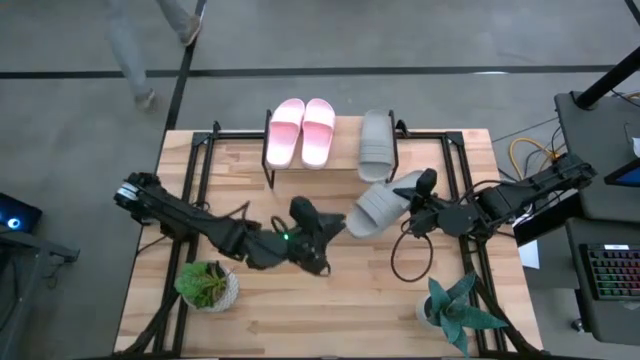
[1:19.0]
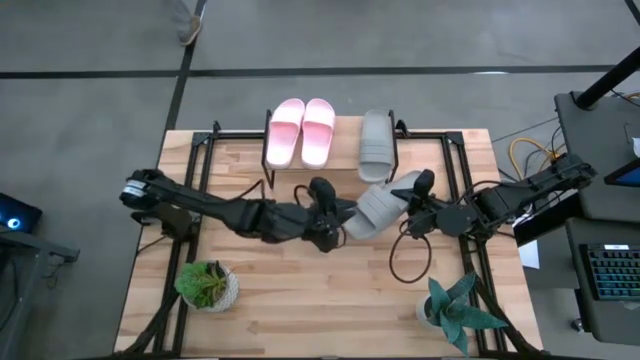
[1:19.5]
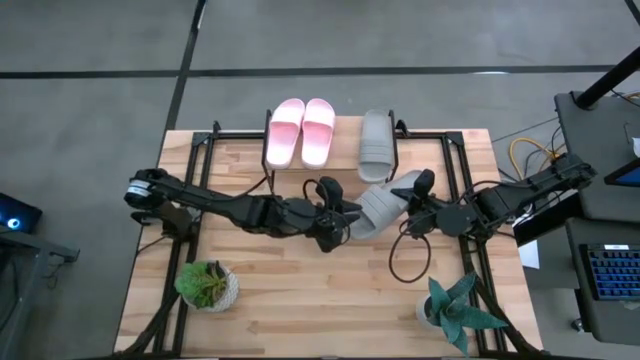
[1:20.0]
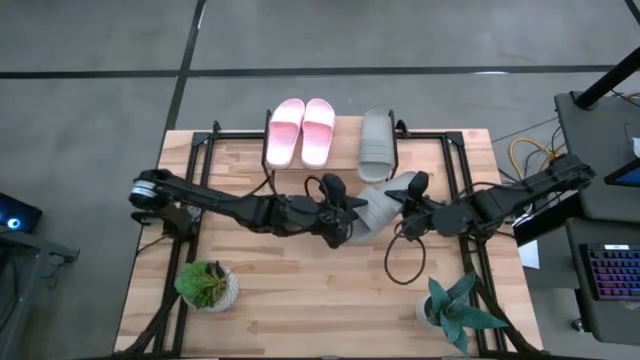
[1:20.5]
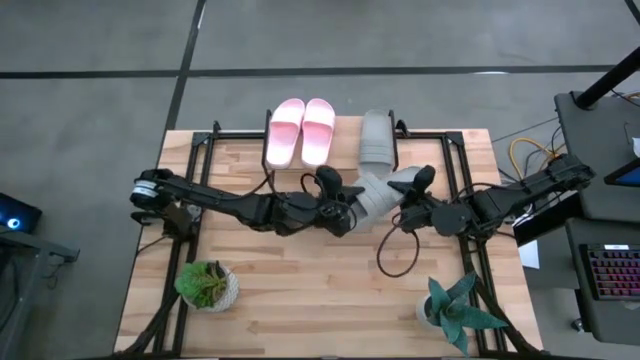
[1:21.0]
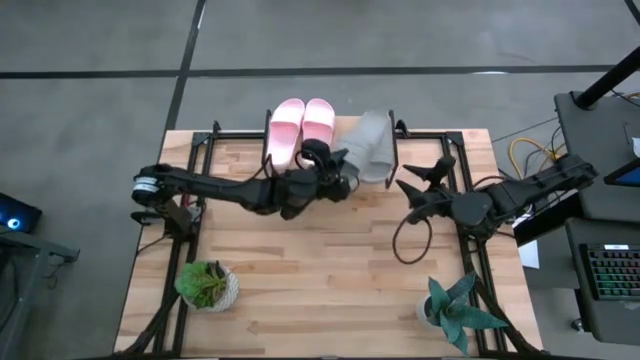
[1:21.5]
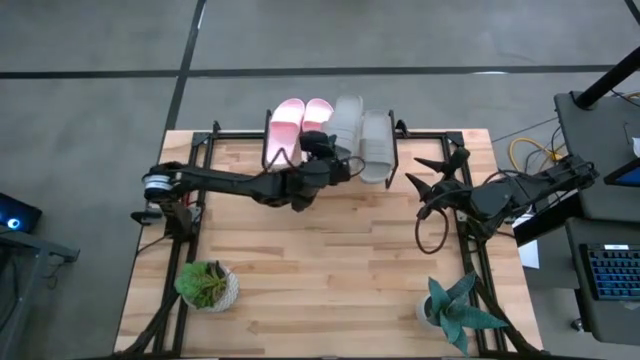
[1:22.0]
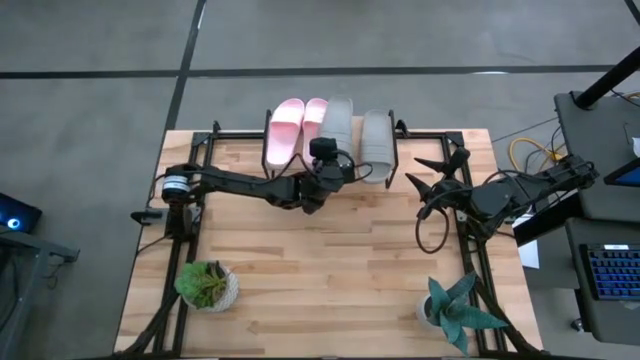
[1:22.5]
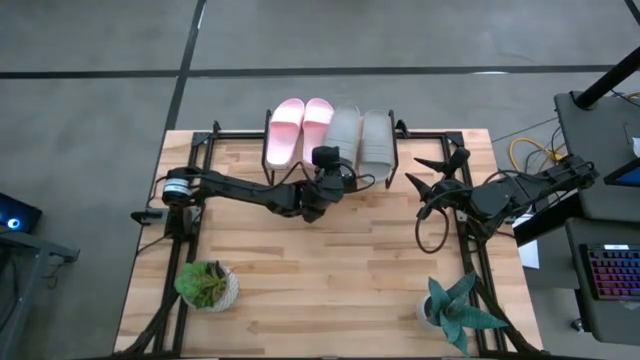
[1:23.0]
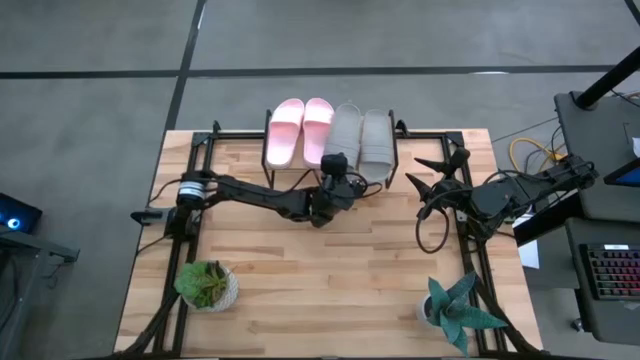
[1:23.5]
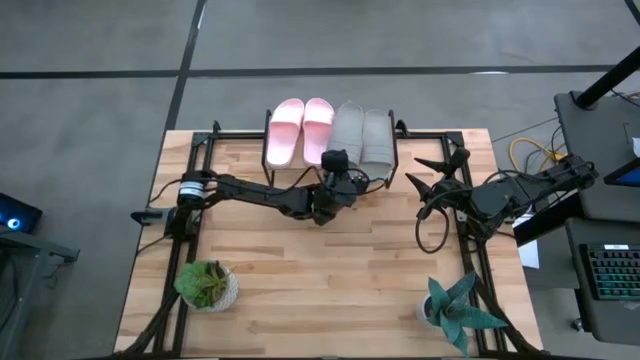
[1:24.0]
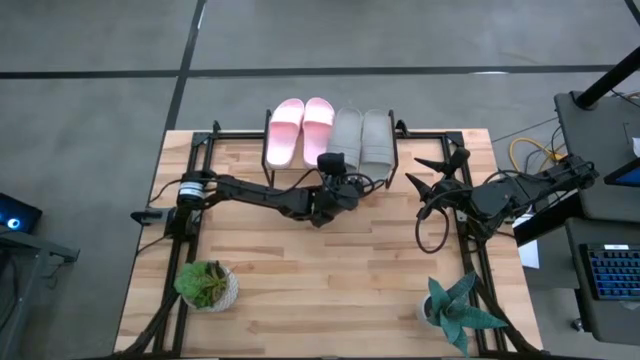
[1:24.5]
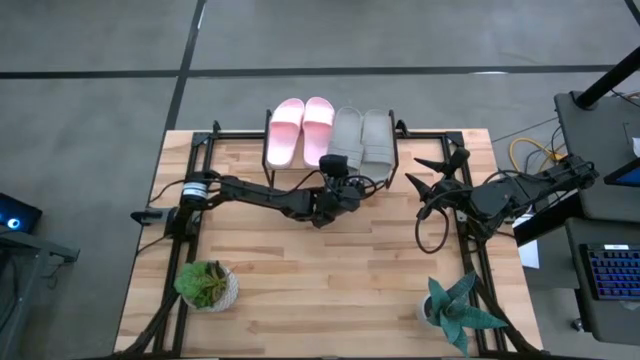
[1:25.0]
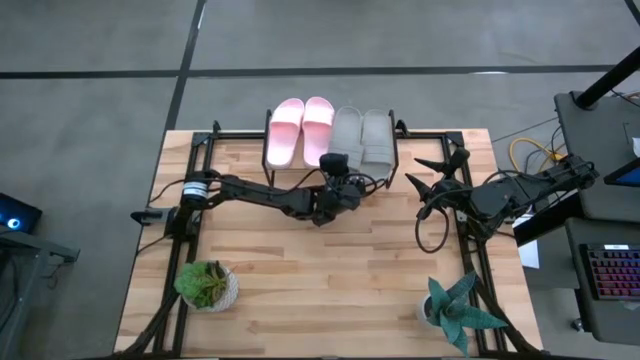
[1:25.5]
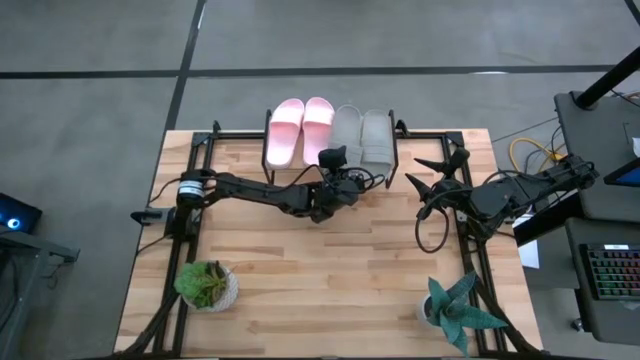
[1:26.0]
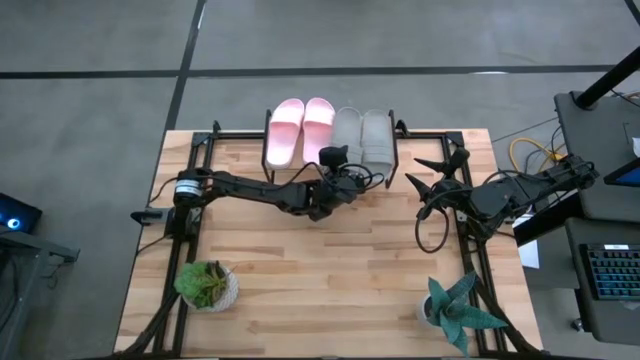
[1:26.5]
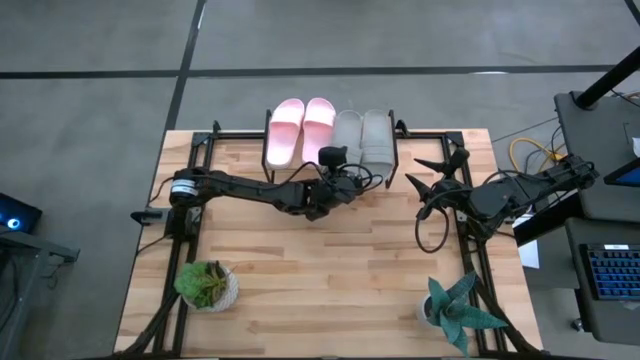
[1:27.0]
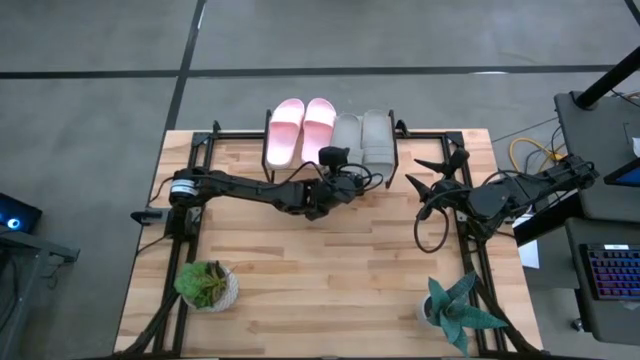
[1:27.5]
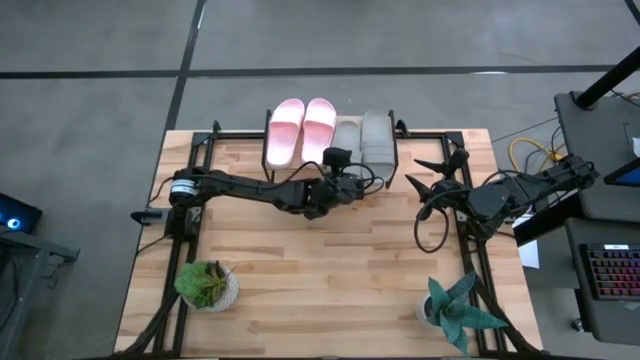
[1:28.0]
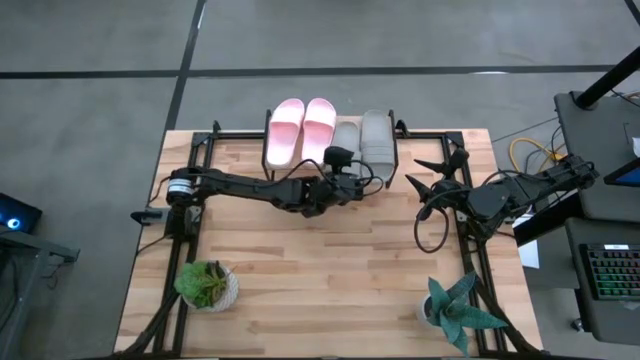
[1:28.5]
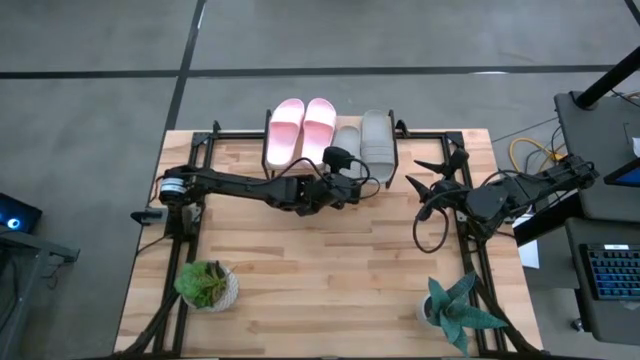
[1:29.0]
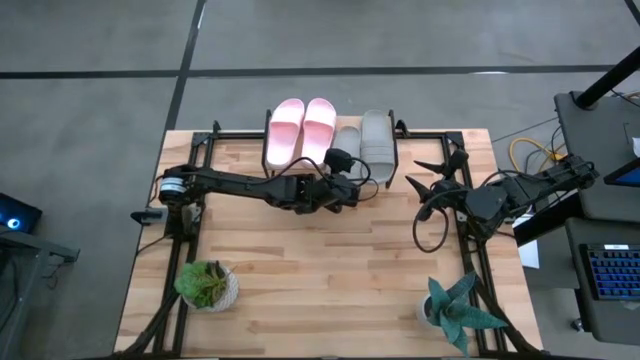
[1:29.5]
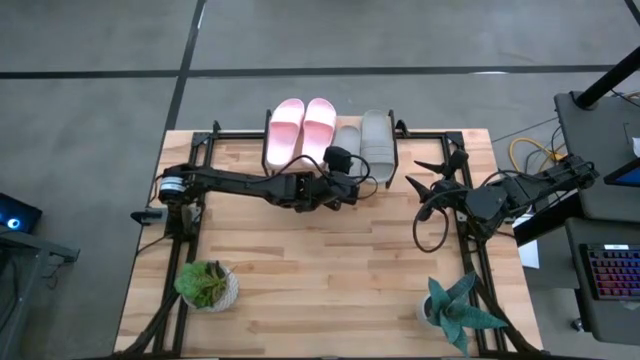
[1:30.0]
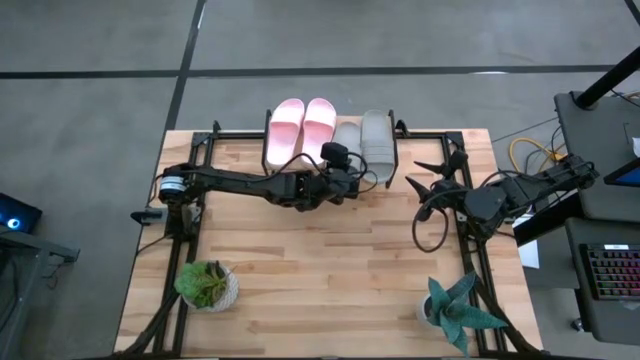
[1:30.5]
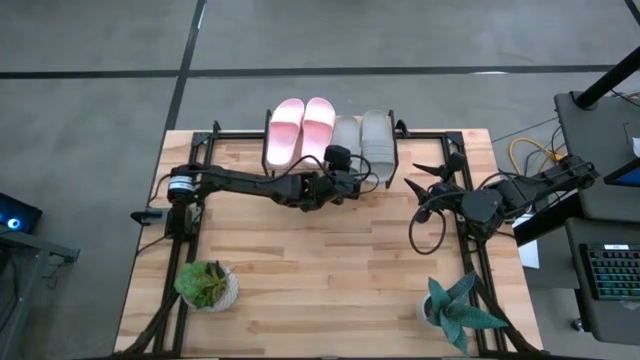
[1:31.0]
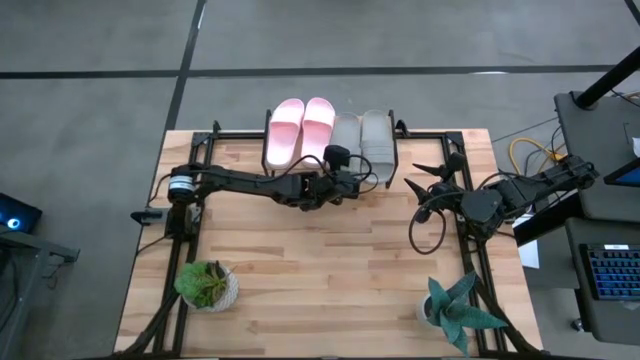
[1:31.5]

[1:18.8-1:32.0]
Task: Pick and place slides into the shelf
Put the gray slides on the shelf

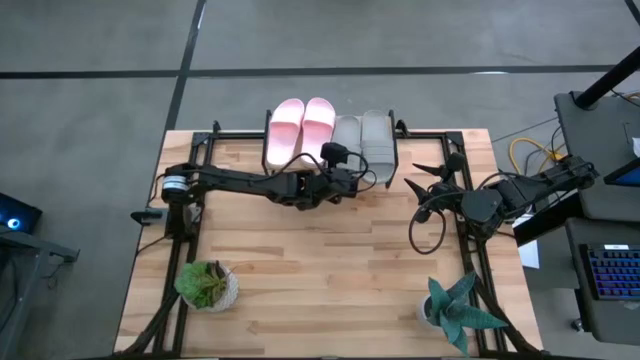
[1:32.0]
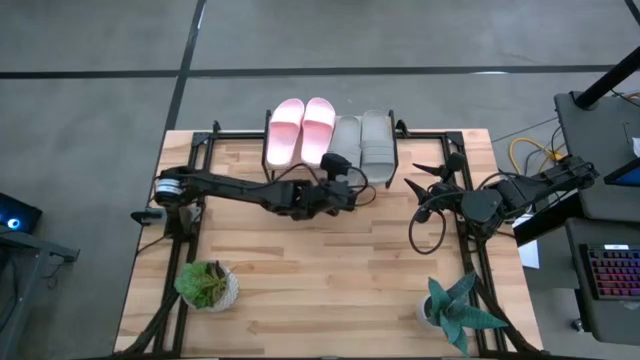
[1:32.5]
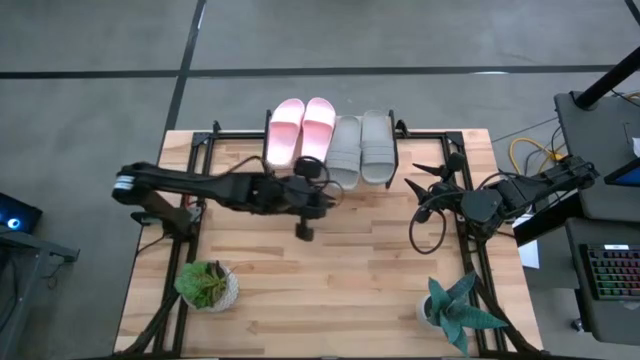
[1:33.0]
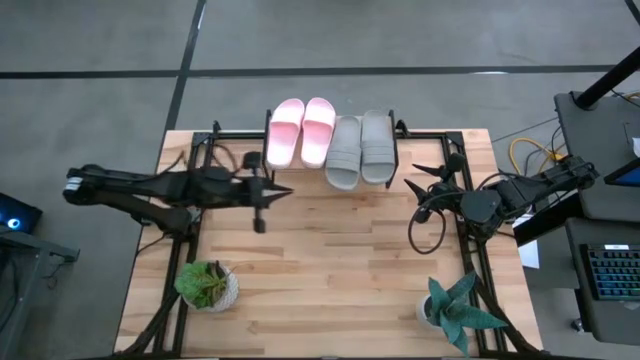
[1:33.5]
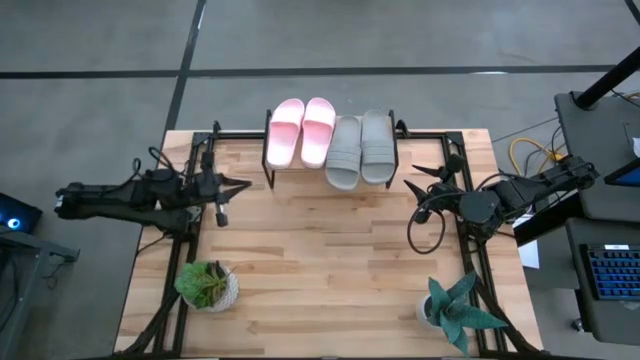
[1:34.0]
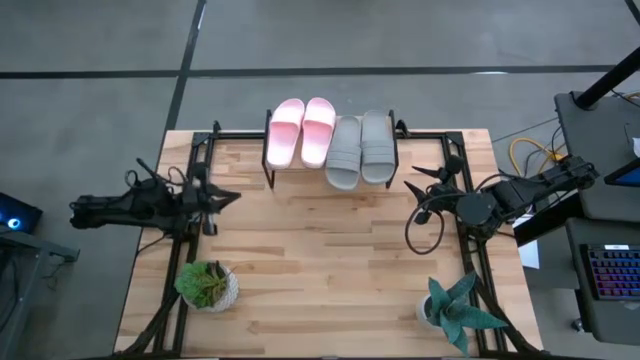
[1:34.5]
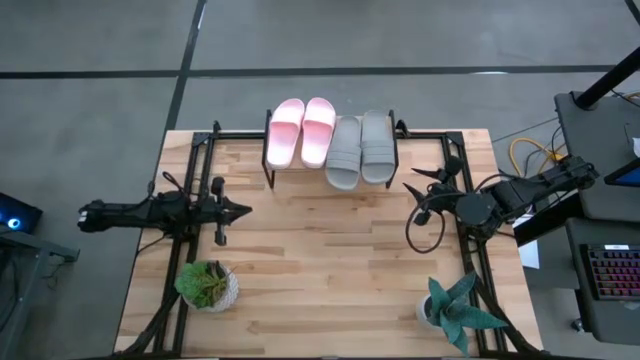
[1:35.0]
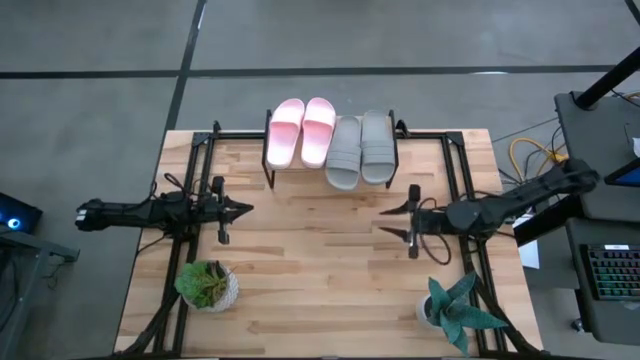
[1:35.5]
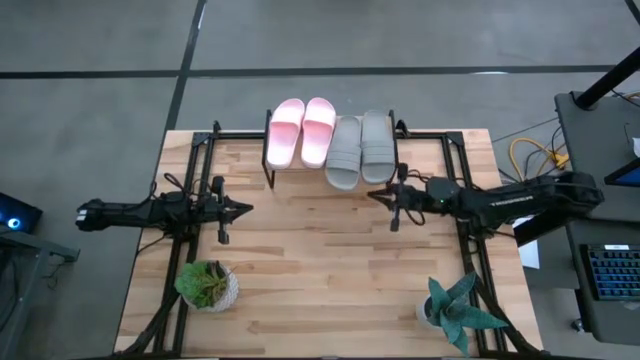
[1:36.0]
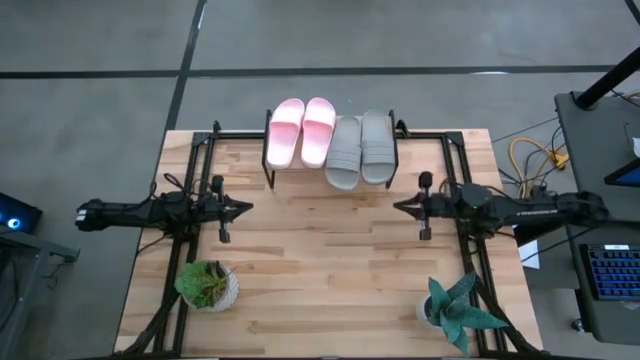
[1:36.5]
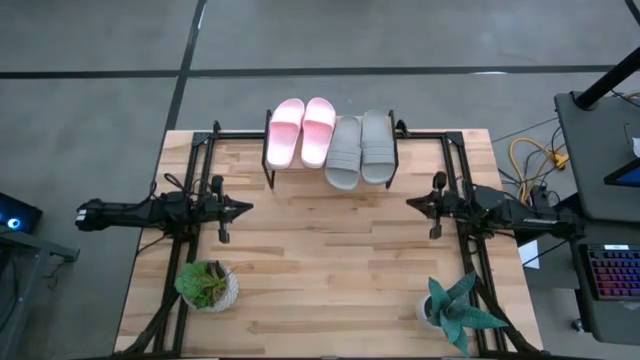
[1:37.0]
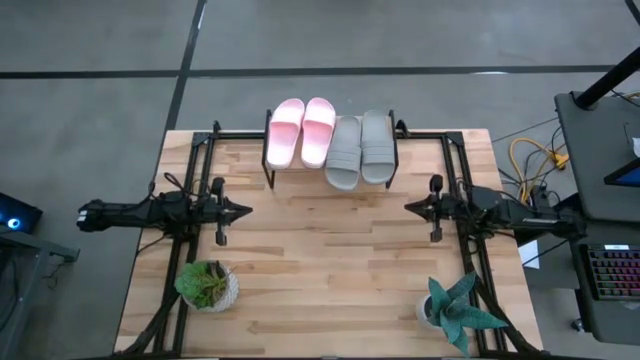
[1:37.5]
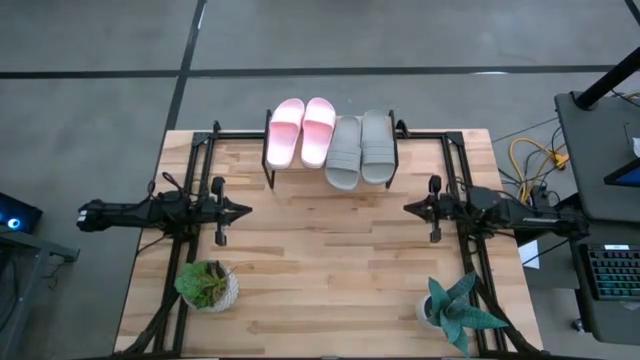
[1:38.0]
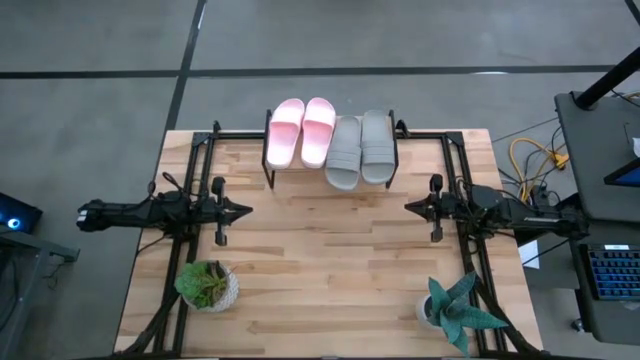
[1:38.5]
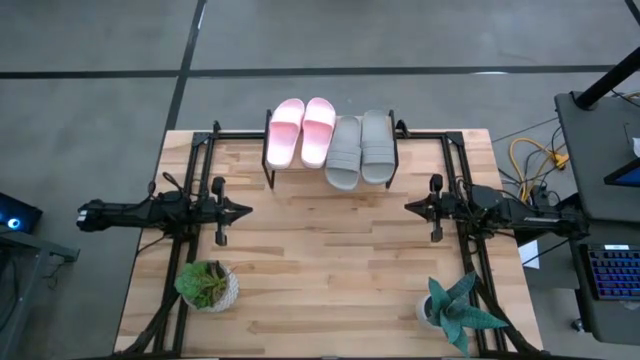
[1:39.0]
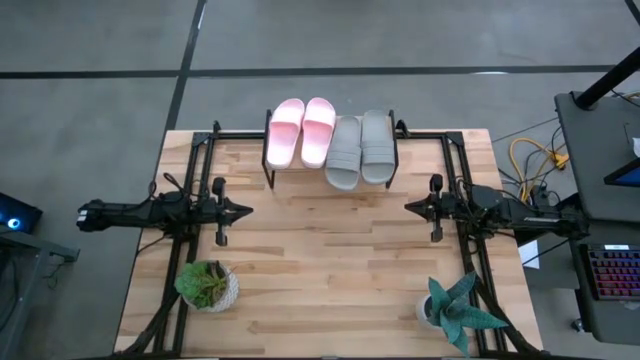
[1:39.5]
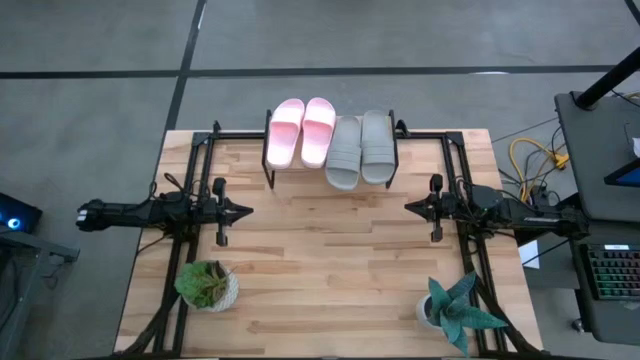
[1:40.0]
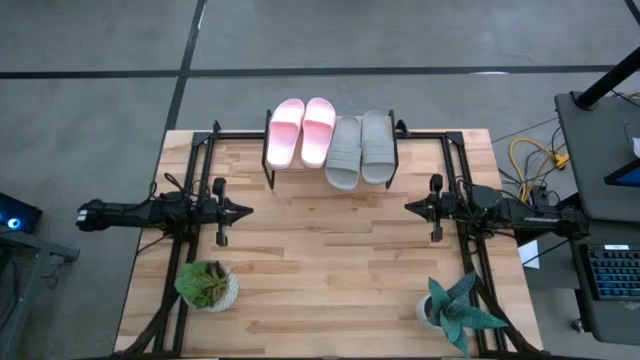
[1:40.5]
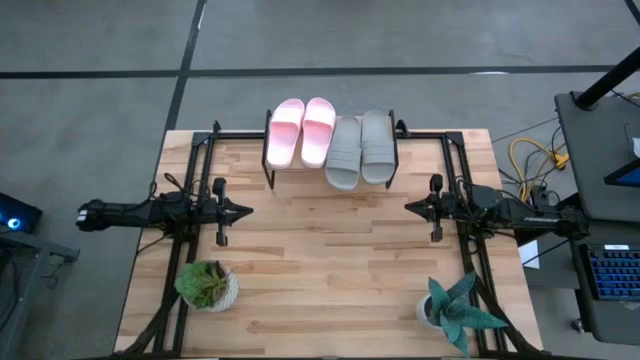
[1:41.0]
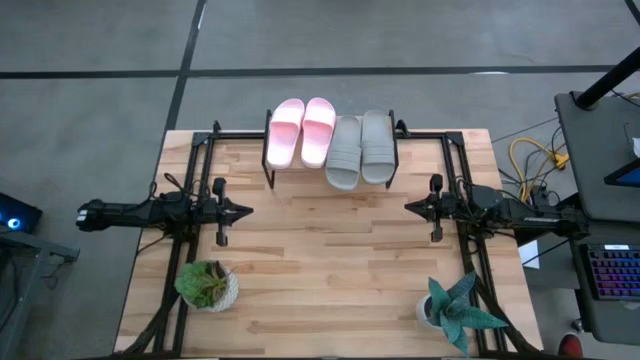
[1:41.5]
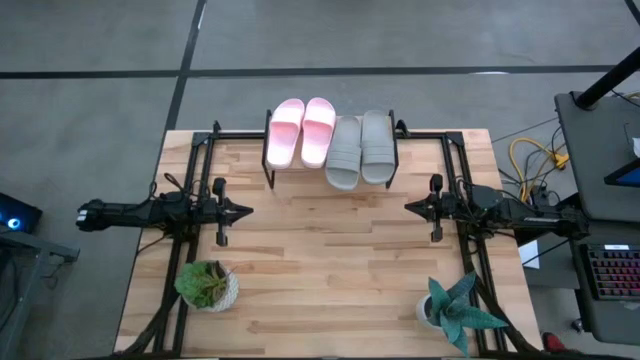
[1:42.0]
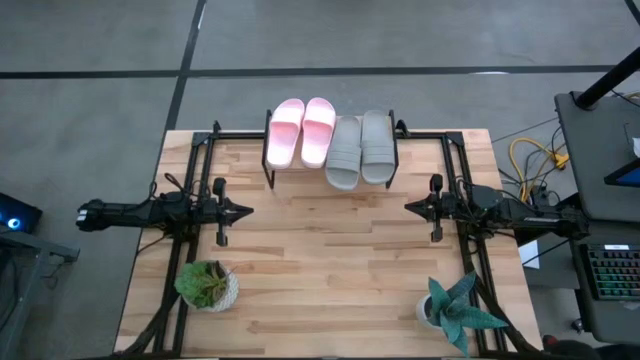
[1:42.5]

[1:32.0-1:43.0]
Return to Home Position
